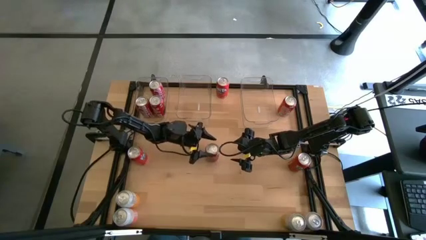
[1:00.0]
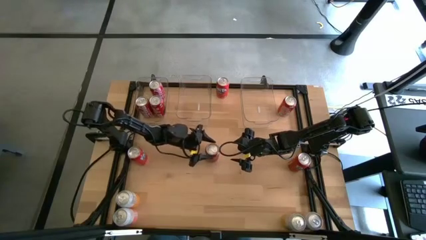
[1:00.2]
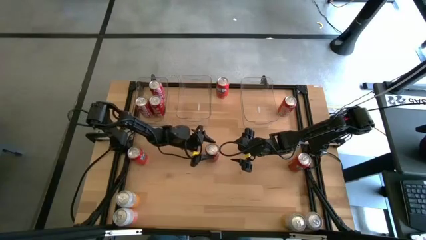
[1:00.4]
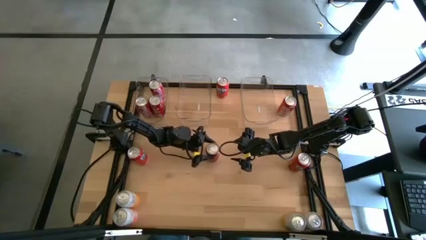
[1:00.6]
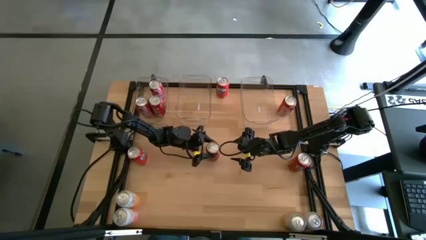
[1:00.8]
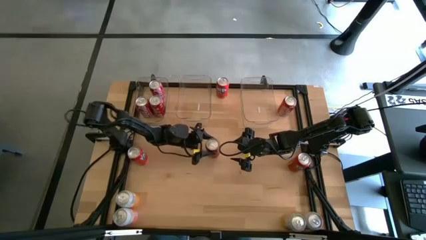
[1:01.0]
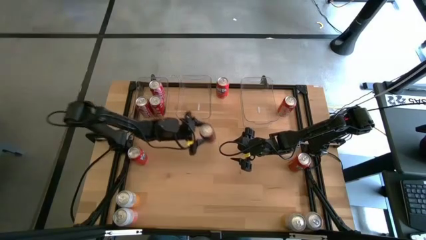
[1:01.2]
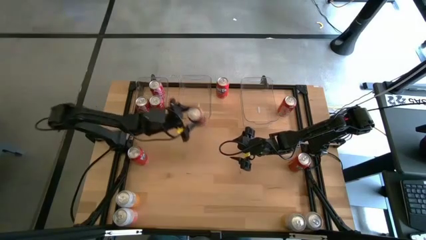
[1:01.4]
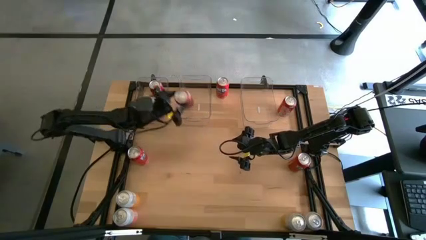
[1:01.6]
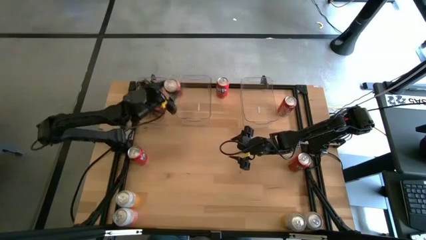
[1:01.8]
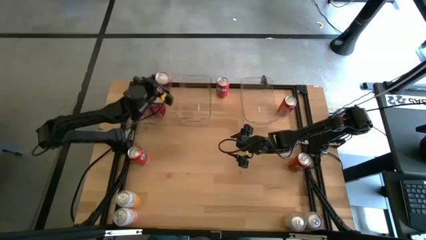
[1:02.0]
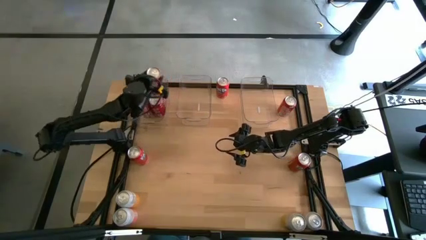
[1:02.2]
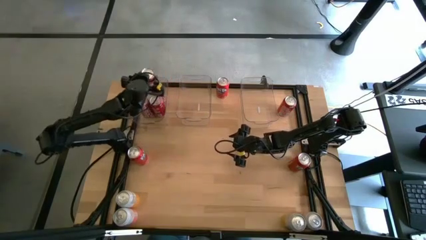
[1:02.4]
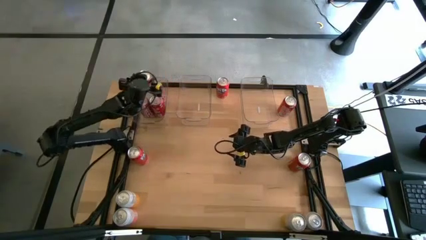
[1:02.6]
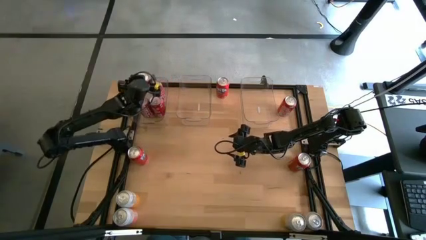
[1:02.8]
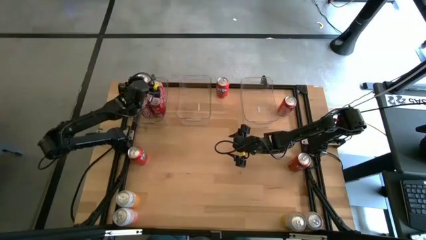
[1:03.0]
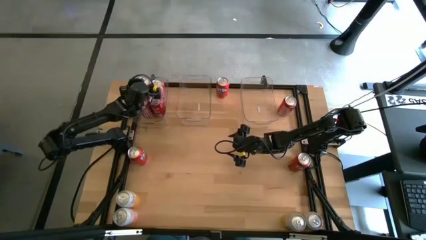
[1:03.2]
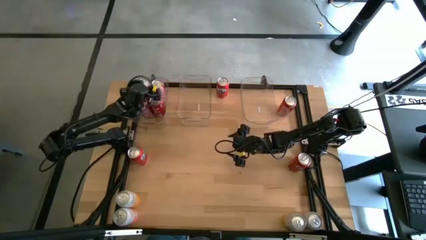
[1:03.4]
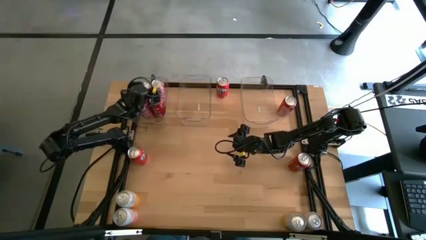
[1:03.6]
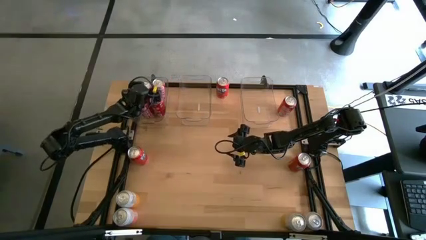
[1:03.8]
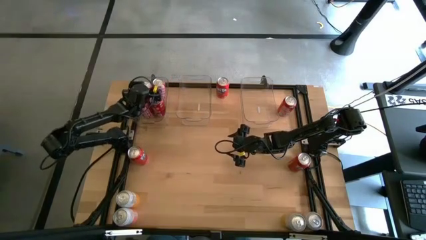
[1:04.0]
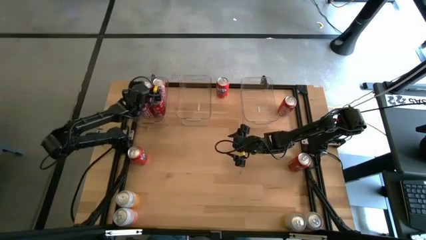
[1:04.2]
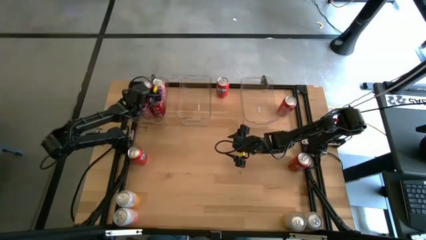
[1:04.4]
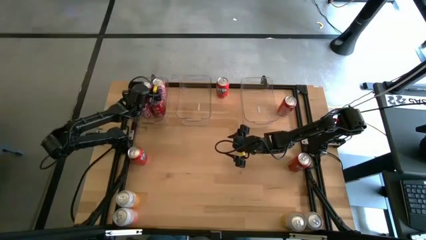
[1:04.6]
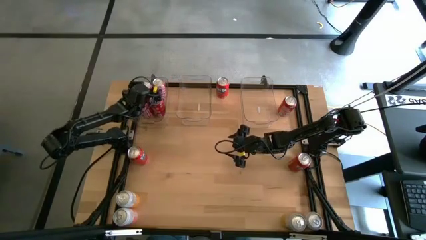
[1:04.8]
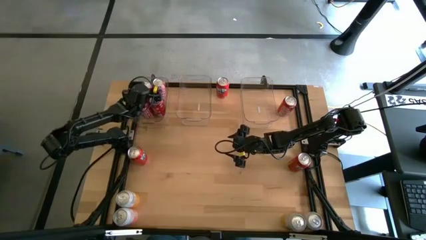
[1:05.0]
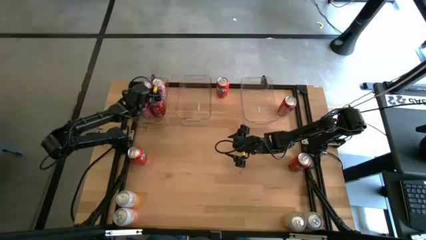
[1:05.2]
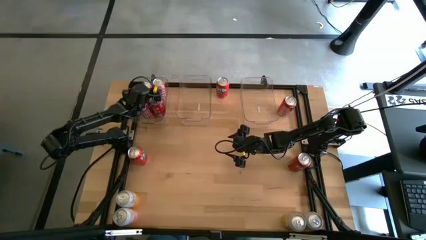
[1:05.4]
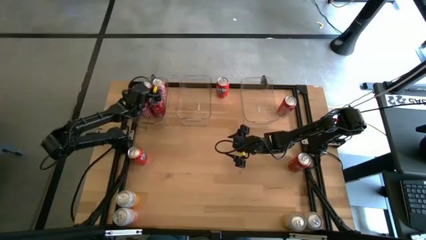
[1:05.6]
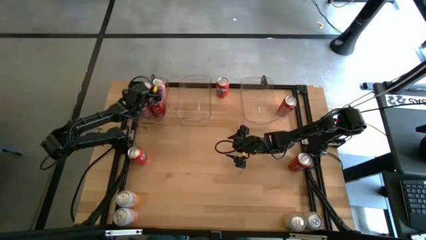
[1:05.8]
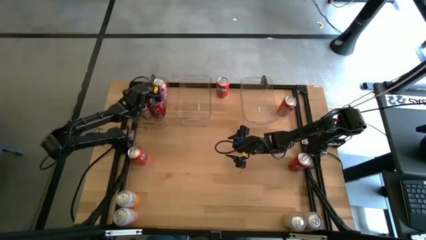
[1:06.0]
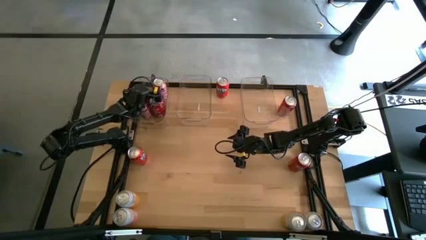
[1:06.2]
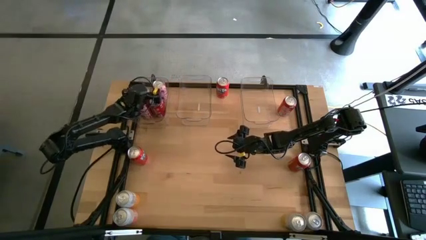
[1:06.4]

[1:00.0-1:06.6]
Task: Sort soda cans
Put the red soda can into the left transparent bin

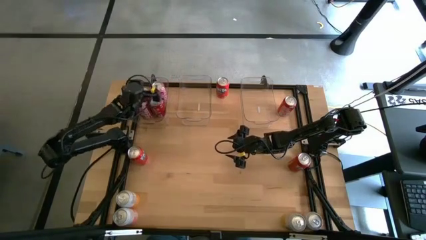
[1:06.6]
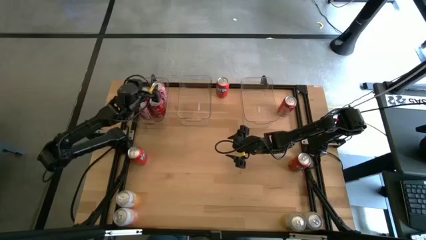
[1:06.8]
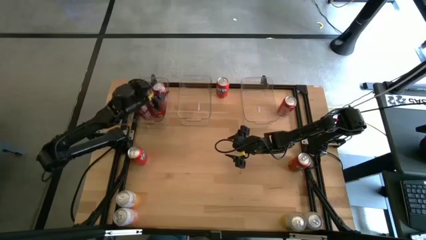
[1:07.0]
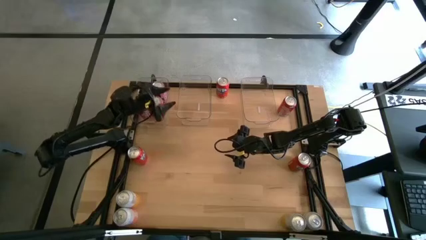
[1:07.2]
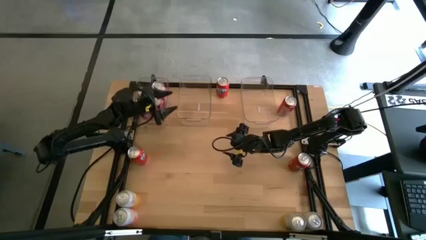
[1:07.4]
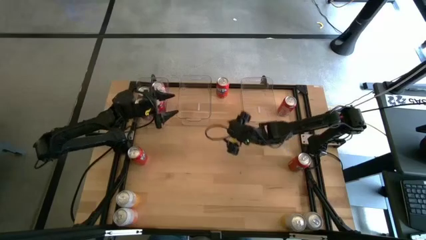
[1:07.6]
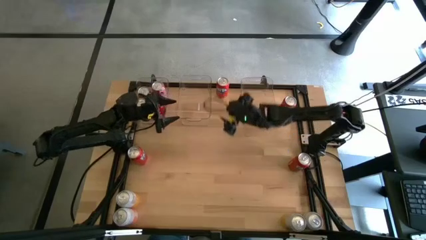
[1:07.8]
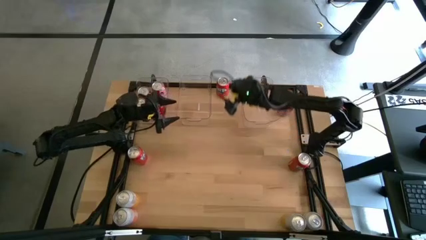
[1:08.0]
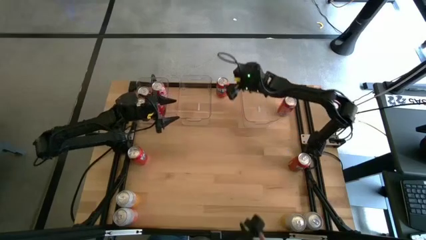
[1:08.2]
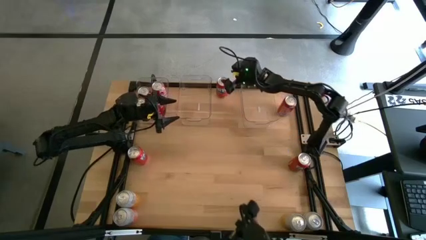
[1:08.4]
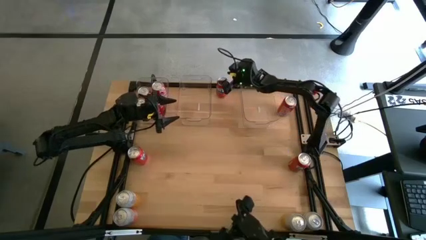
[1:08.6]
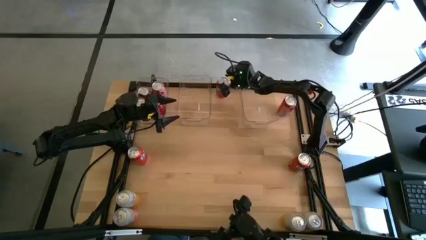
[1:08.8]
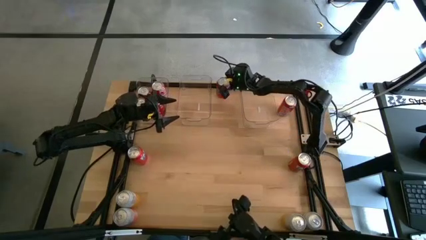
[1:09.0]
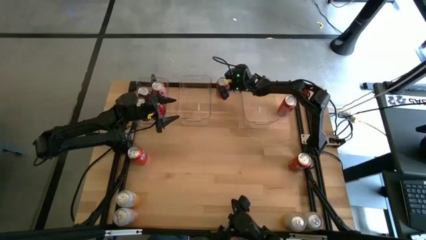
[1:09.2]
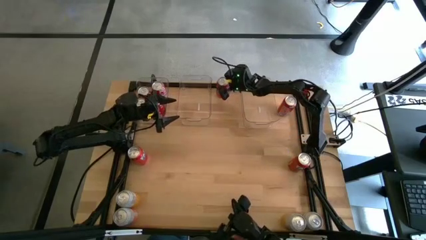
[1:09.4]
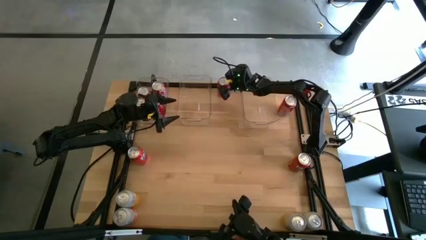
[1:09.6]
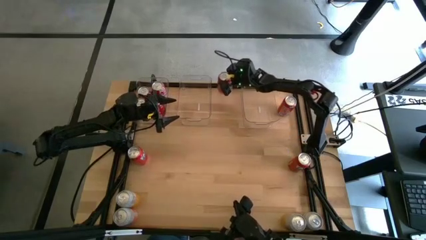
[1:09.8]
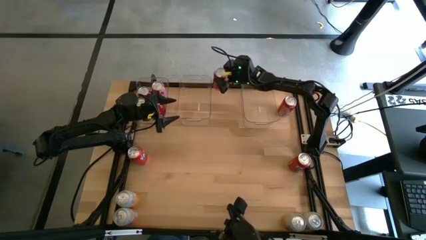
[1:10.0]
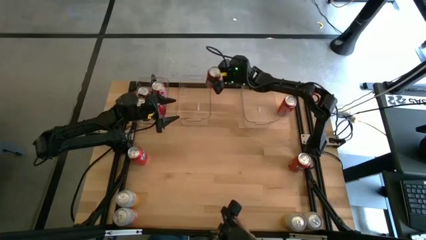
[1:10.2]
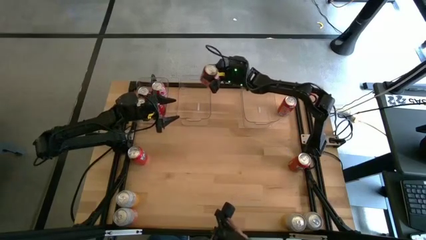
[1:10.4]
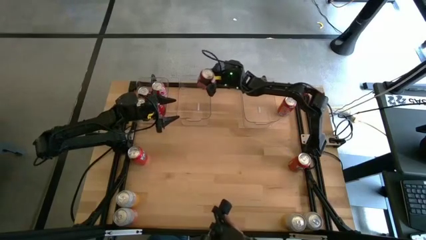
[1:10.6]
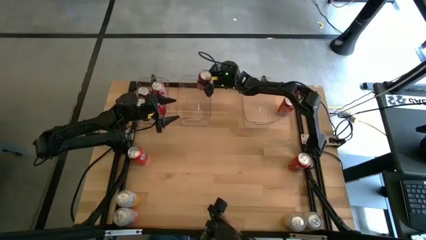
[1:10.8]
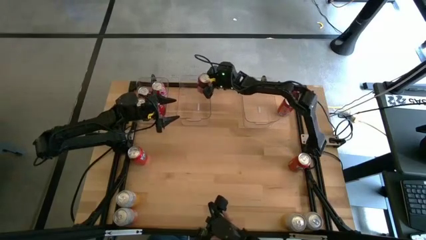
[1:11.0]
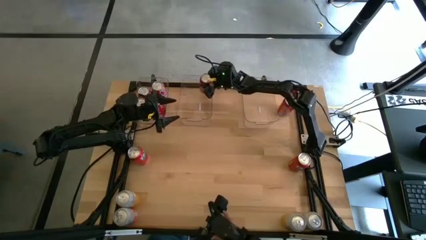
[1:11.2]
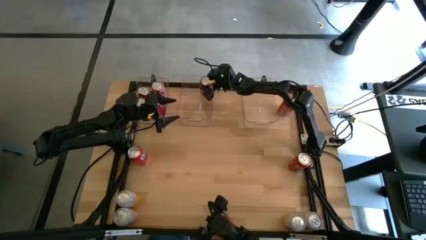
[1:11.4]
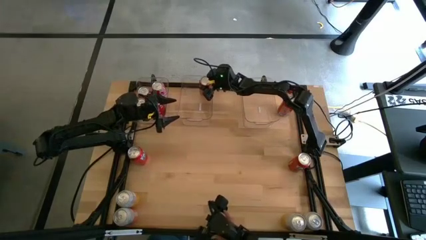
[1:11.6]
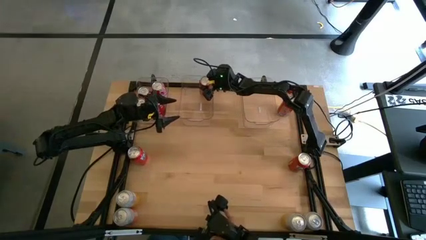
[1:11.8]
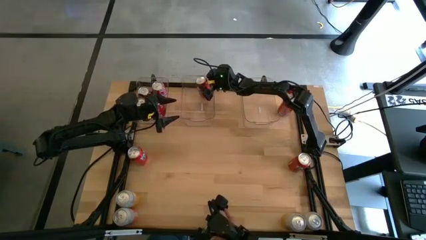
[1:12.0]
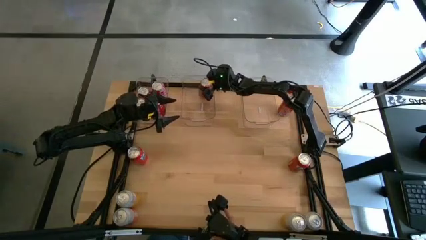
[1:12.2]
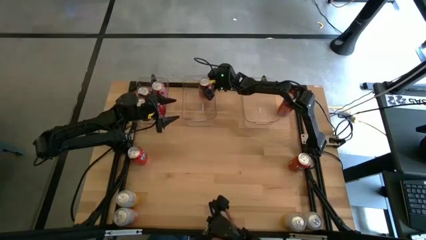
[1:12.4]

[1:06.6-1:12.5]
Put the orange soda can into the middle transparent bin
